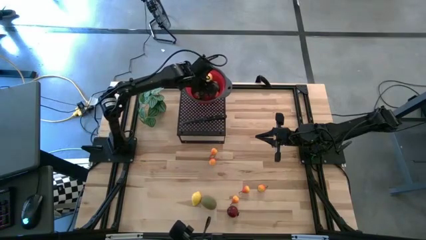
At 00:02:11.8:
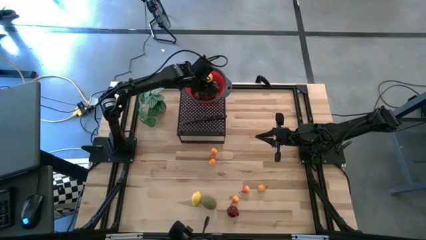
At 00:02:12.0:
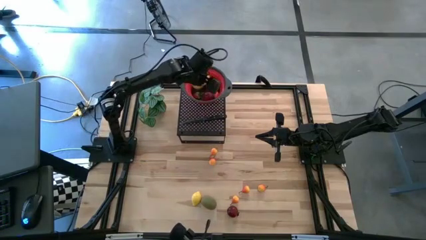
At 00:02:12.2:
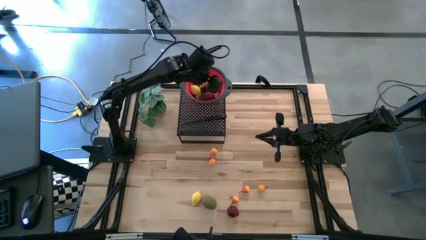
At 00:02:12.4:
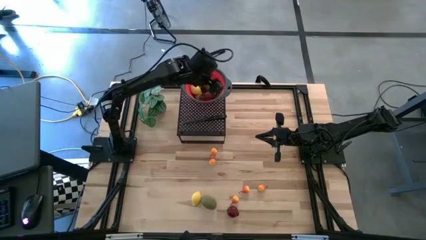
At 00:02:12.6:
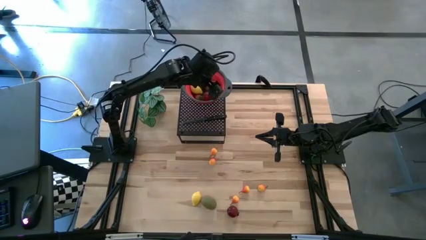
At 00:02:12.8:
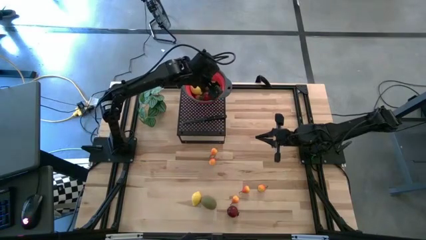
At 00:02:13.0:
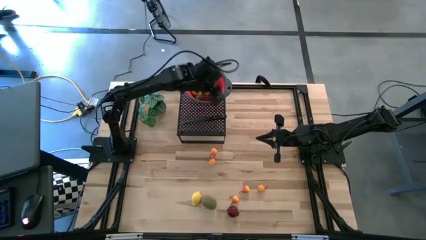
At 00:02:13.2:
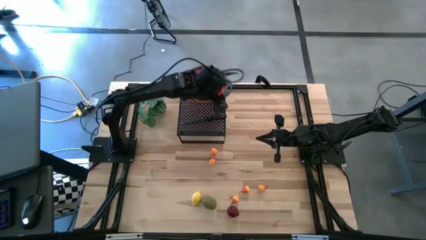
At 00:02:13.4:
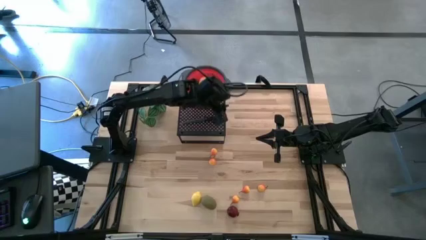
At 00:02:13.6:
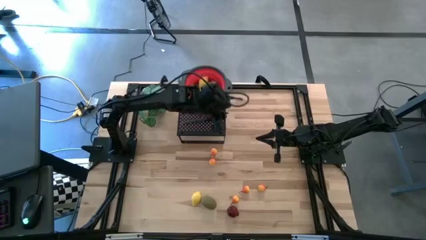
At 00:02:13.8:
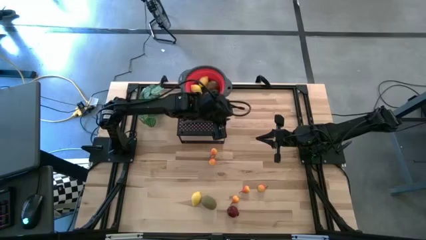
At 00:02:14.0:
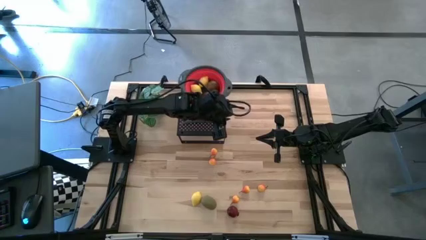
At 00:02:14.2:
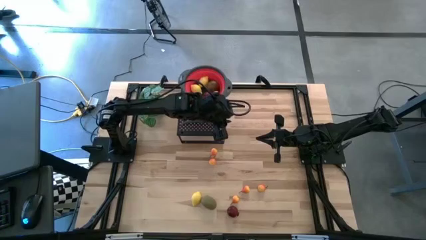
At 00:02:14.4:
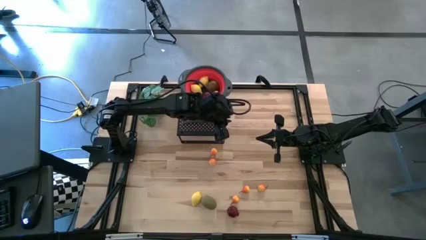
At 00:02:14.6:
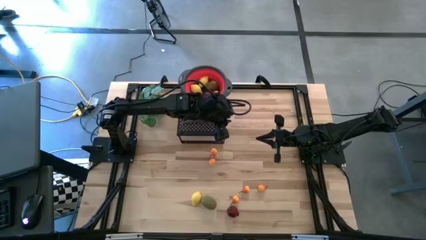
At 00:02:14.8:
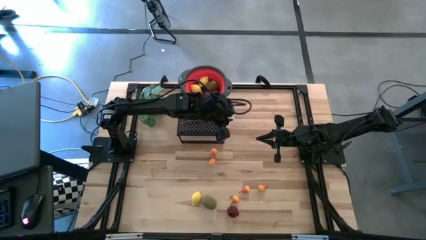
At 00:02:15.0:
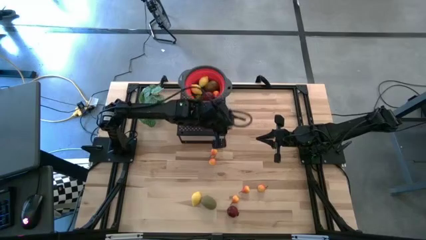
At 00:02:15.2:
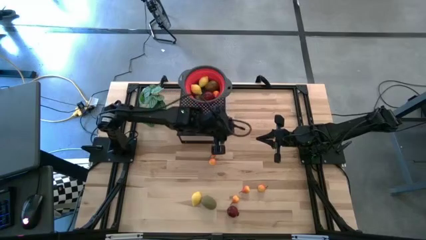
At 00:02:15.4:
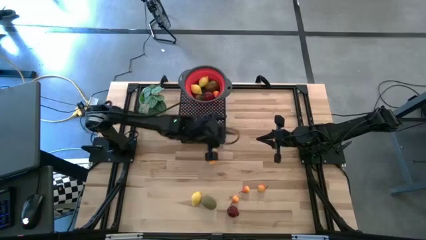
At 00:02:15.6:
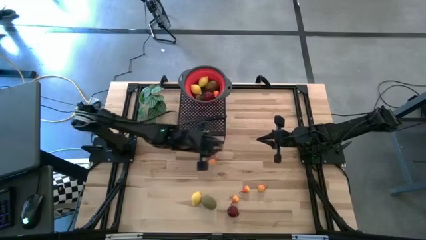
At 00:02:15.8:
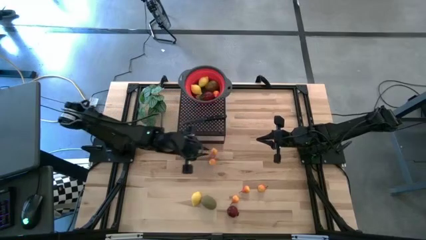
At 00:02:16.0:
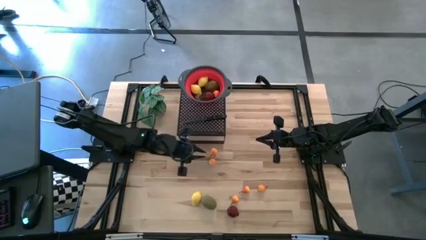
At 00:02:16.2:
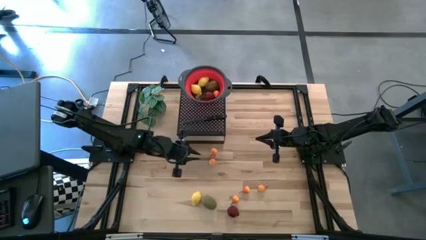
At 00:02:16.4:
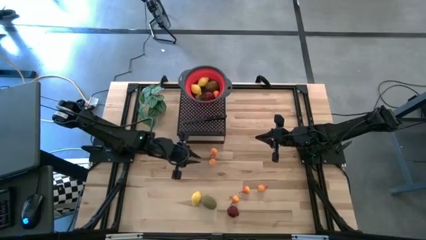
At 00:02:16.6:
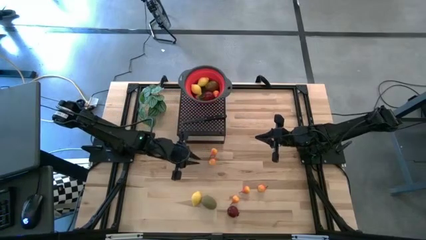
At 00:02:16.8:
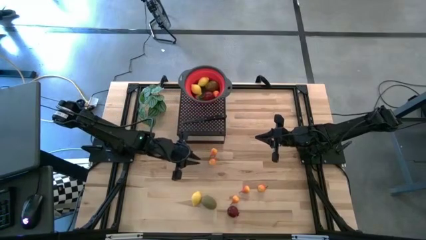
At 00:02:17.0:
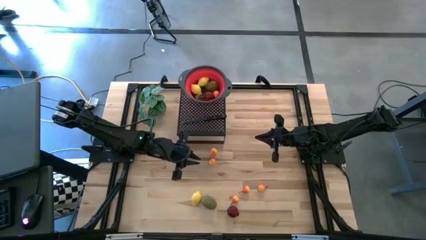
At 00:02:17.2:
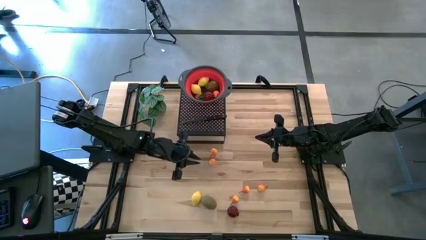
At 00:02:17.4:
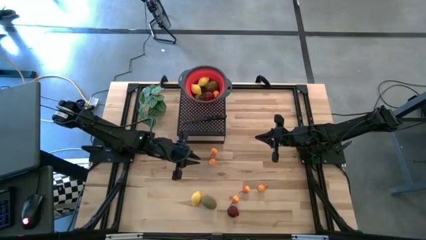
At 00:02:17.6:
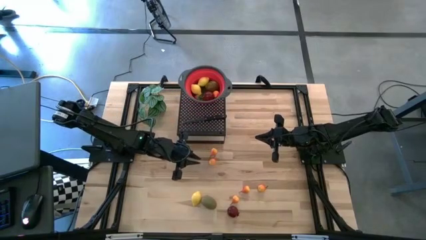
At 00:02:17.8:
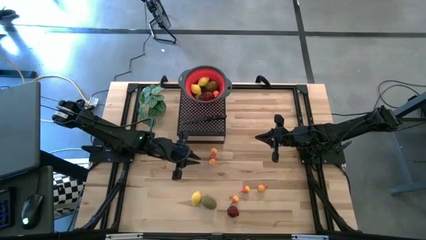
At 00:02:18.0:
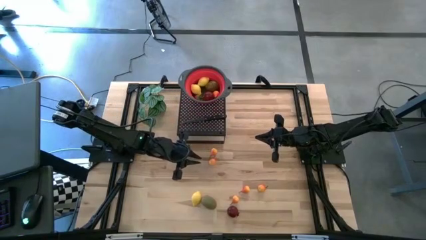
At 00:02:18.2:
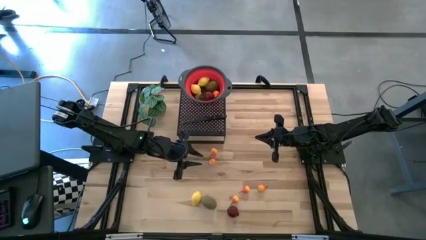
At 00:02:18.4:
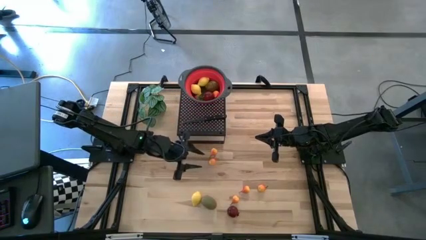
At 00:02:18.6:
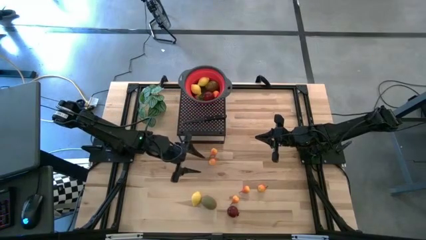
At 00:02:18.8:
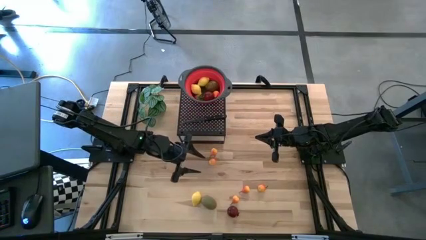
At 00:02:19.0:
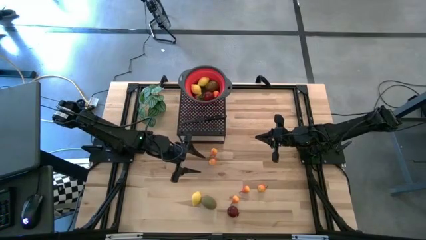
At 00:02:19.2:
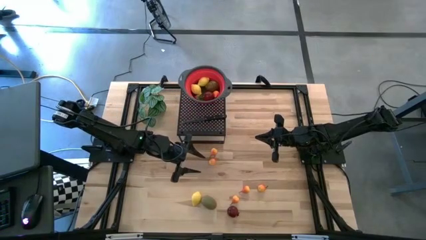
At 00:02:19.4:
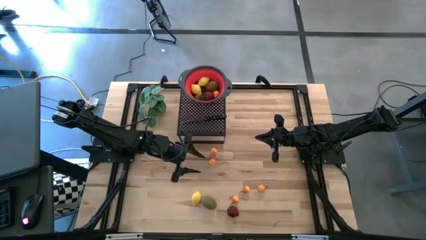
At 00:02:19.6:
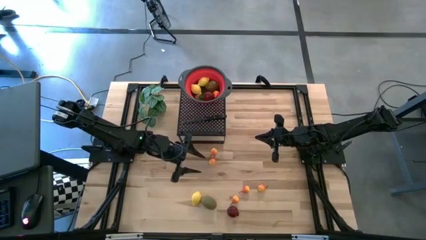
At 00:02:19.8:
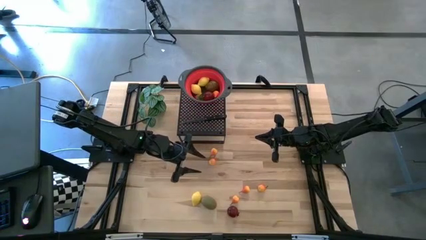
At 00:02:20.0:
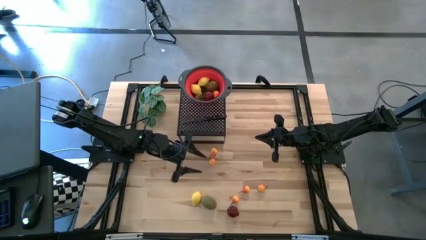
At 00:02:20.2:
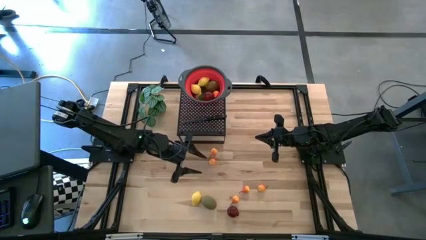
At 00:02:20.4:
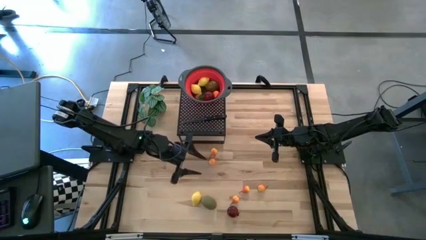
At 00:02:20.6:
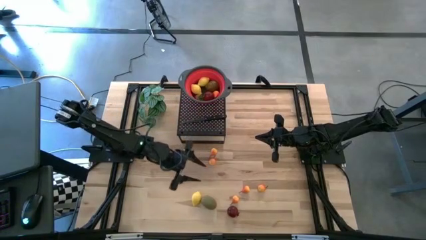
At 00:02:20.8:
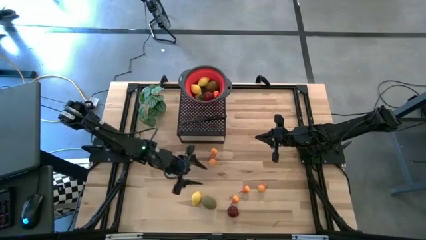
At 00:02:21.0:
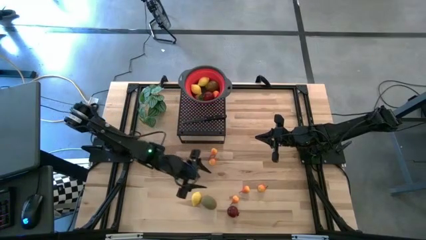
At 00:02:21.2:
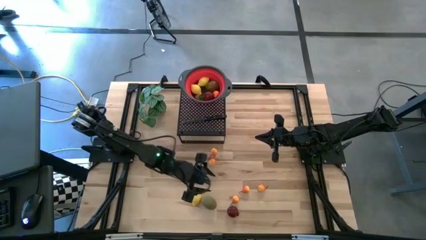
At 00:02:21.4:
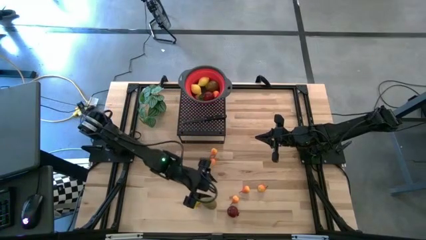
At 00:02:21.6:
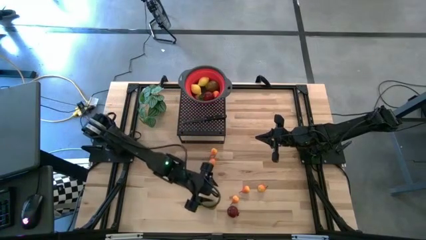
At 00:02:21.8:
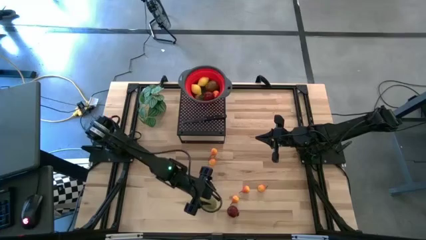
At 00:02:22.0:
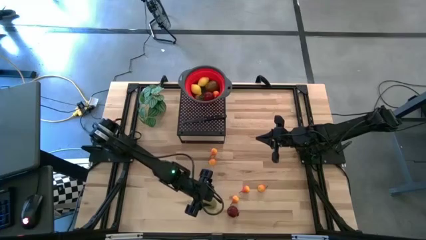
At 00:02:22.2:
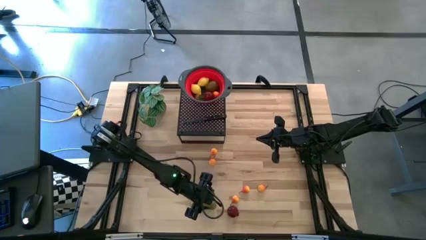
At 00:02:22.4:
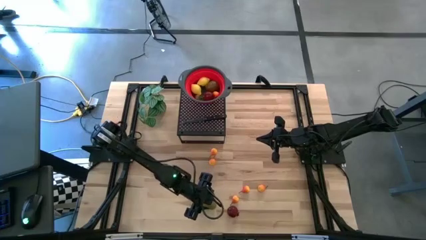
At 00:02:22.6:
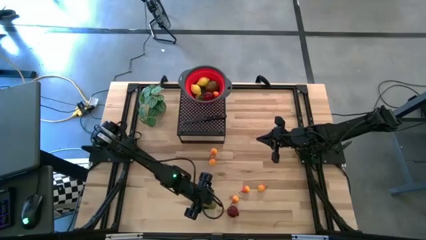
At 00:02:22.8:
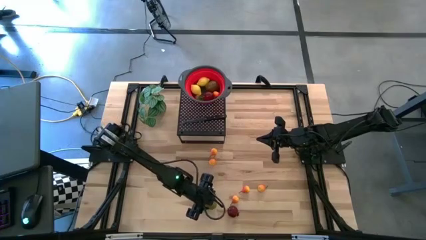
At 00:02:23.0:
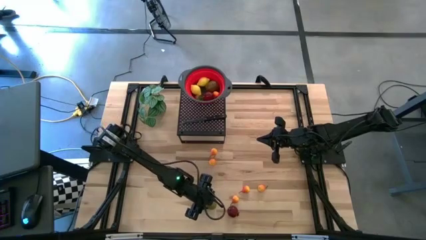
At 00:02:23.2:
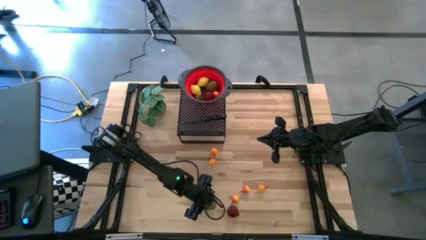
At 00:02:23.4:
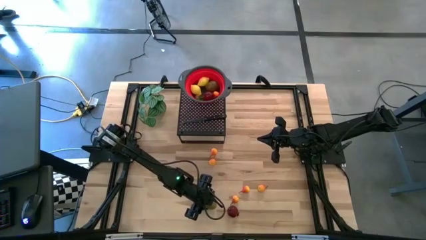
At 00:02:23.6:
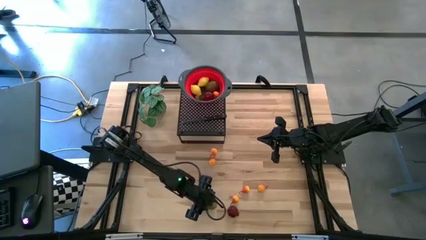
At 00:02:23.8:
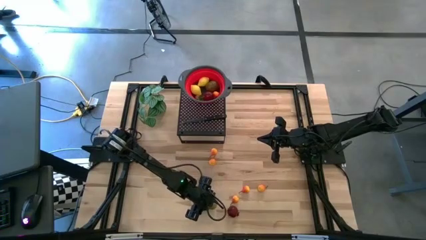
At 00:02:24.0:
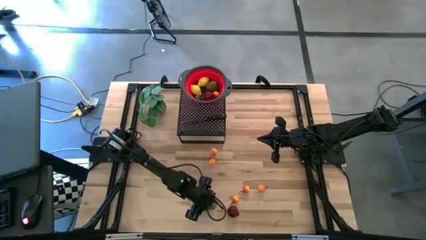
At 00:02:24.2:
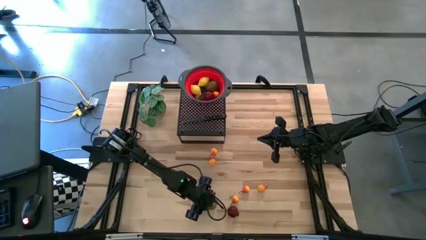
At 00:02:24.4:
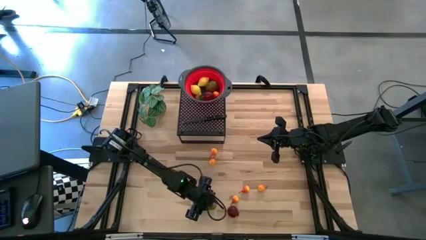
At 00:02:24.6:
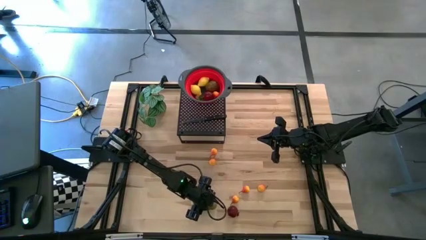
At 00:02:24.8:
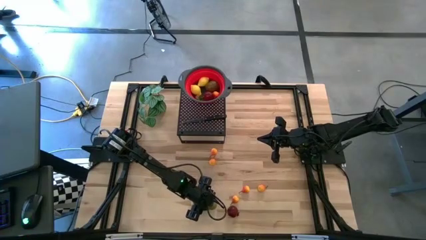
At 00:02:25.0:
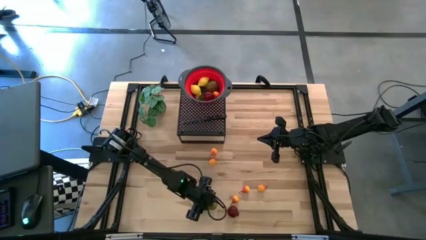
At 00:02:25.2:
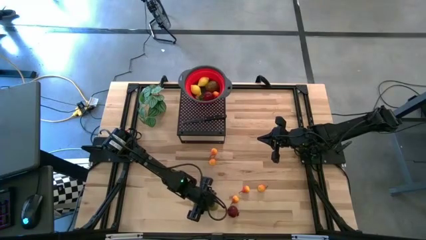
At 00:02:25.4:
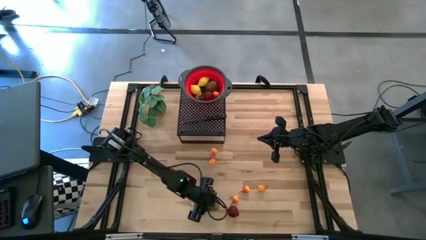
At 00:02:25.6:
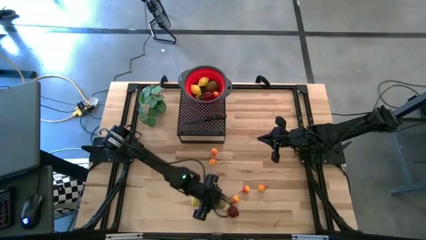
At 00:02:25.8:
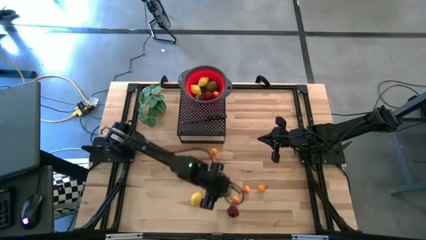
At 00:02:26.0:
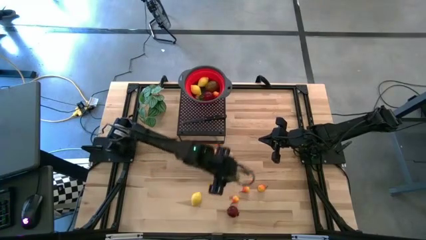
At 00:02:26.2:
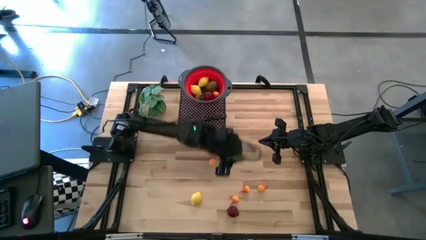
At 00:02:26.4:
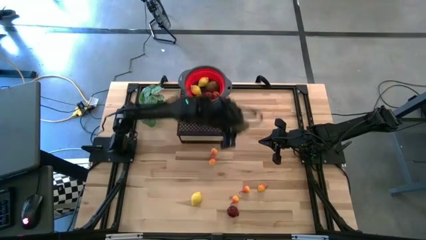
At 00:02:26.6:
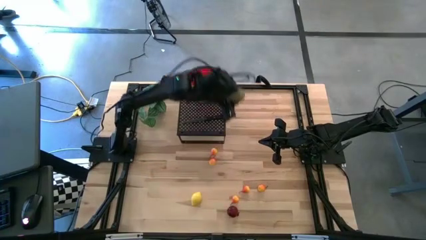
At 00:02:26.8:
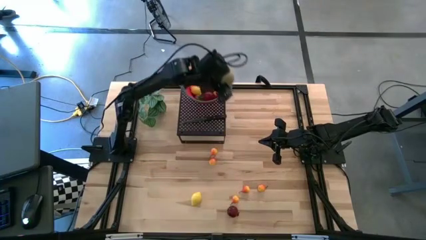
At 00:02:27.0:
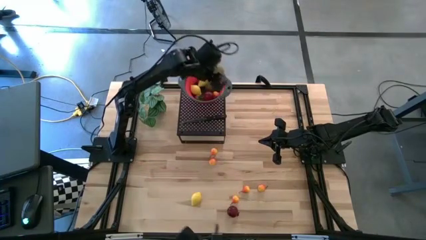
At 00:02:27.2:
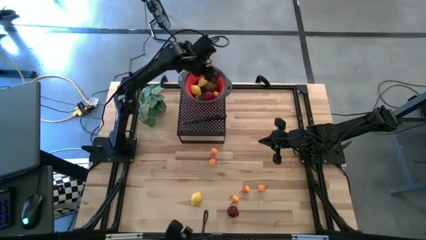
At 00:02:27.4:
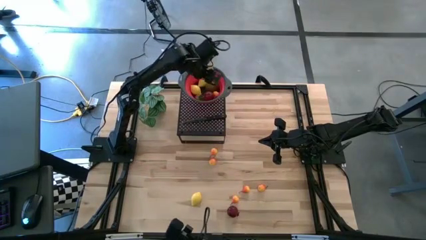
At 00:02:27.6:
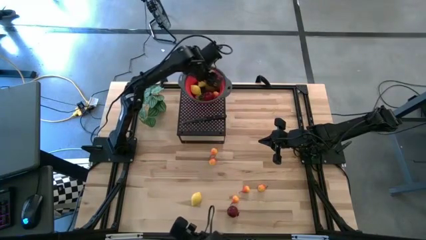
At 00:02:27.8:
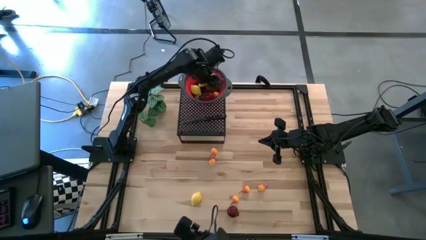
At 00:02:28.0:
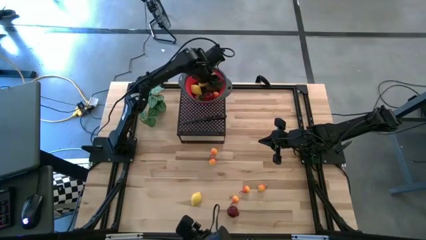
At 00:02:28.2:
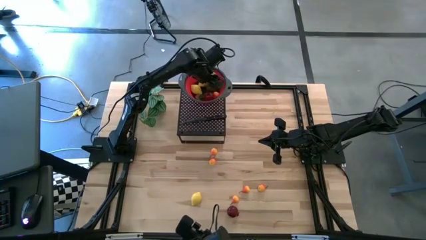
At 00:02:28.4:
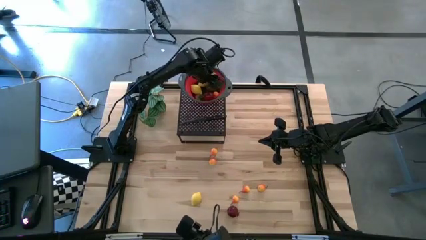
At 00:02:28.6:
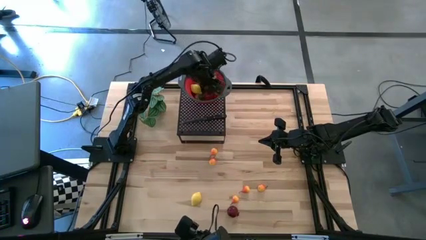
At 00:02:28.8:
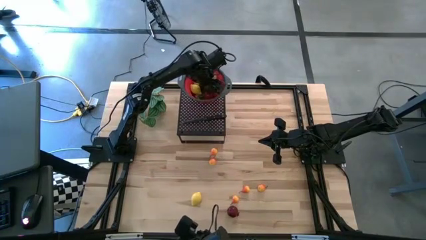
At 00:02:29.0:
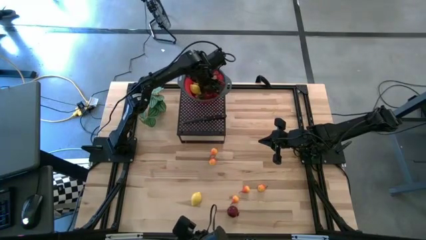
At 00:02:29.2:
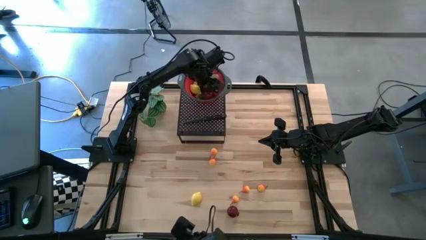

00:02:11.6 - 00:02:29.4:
Task: Pick & Place Fruit
Put the kiwi into the red strainer bowl
